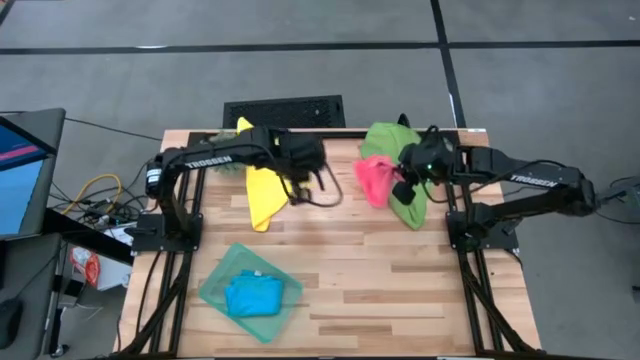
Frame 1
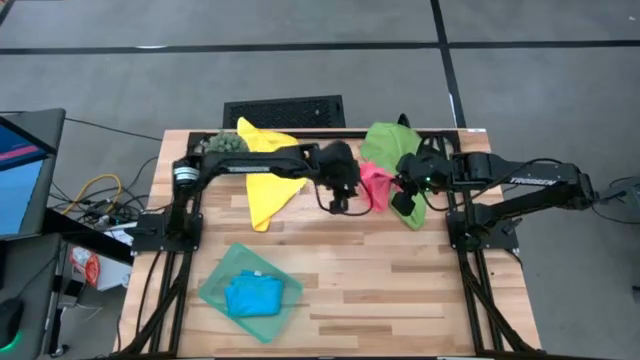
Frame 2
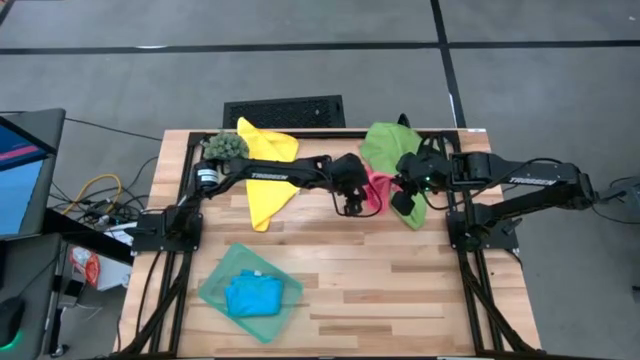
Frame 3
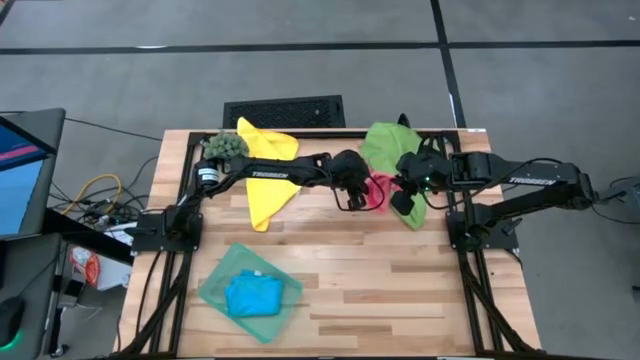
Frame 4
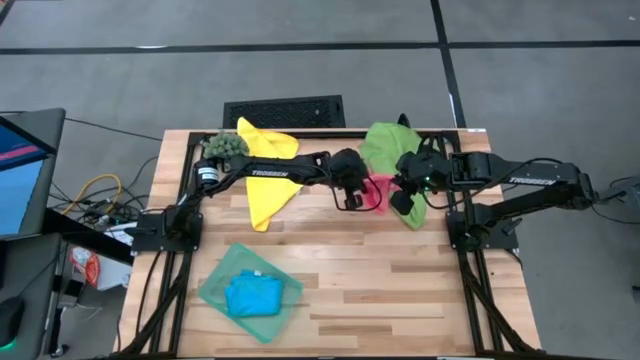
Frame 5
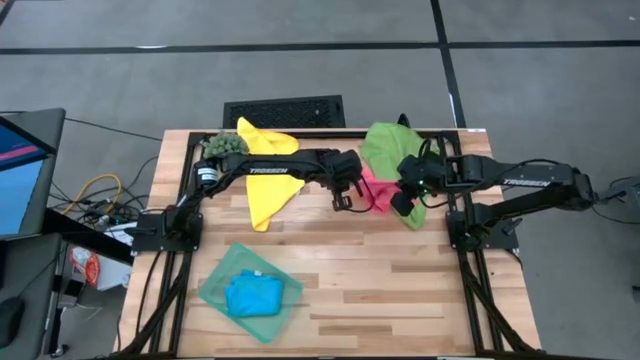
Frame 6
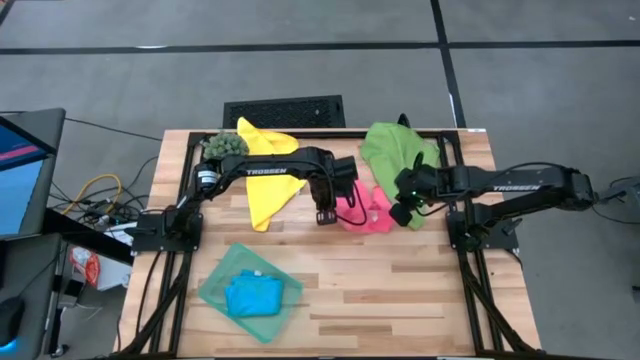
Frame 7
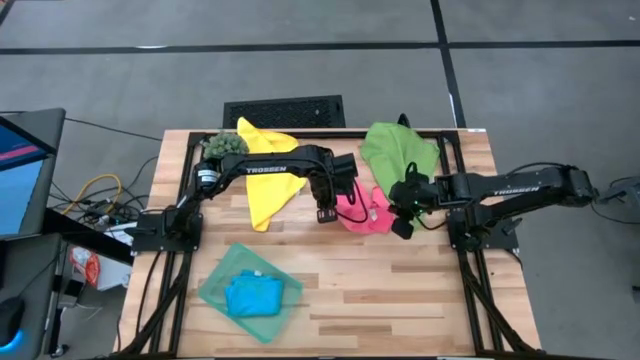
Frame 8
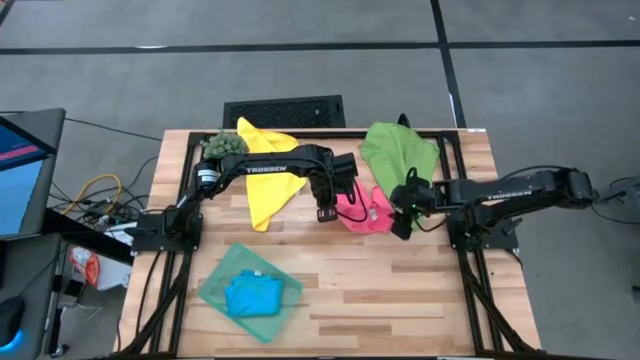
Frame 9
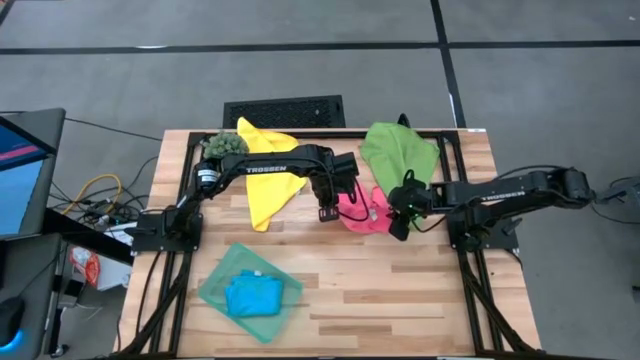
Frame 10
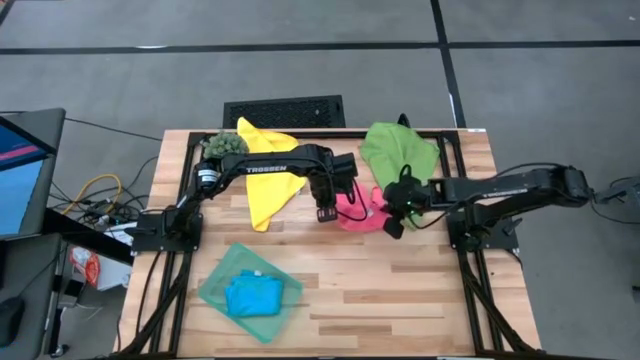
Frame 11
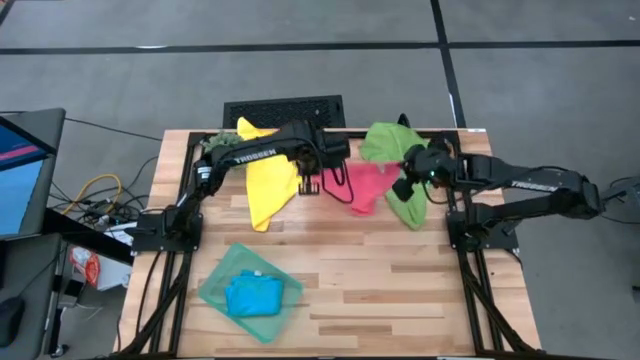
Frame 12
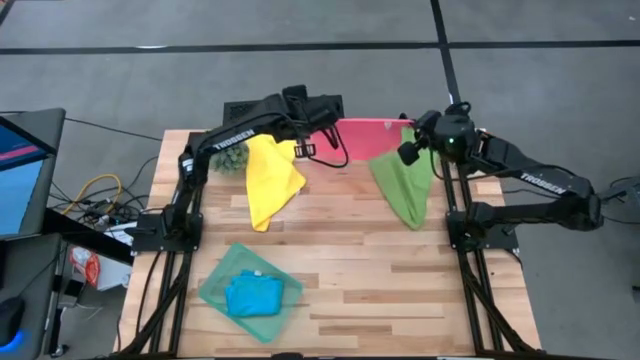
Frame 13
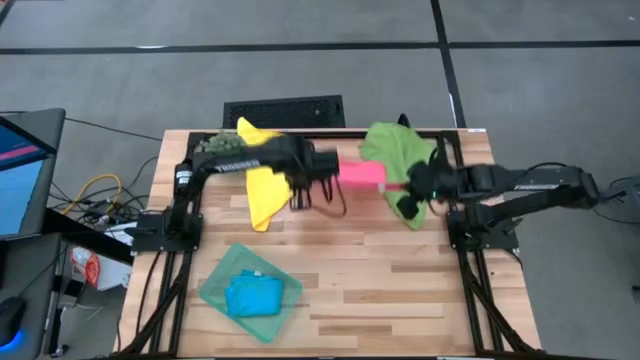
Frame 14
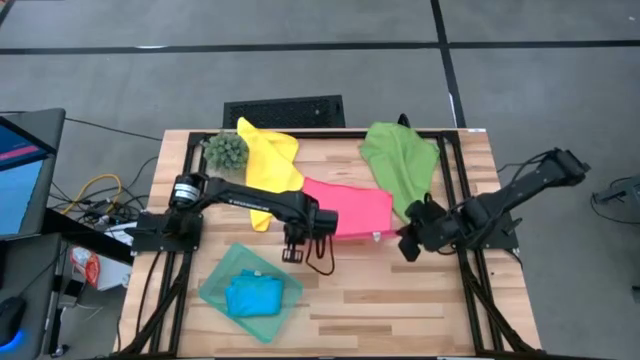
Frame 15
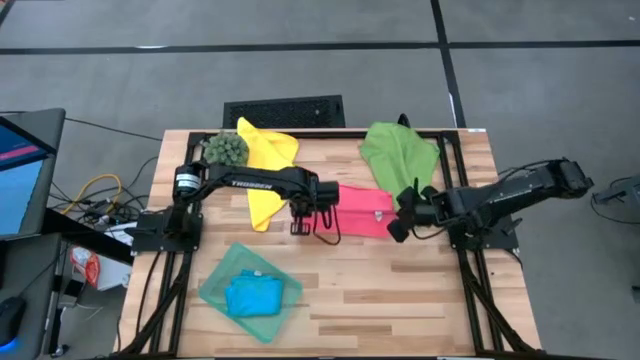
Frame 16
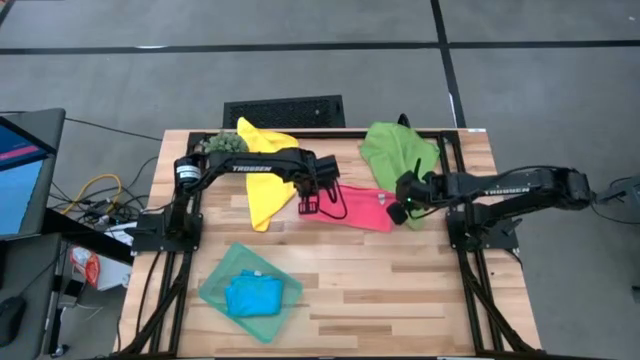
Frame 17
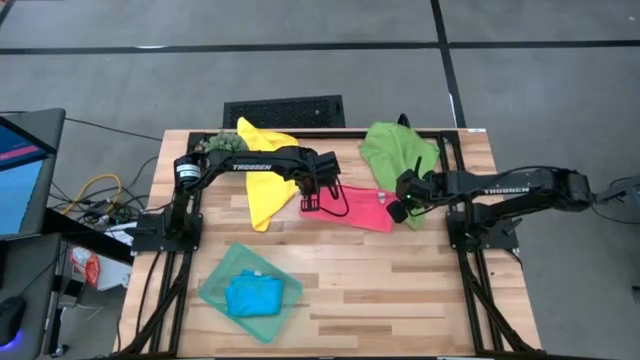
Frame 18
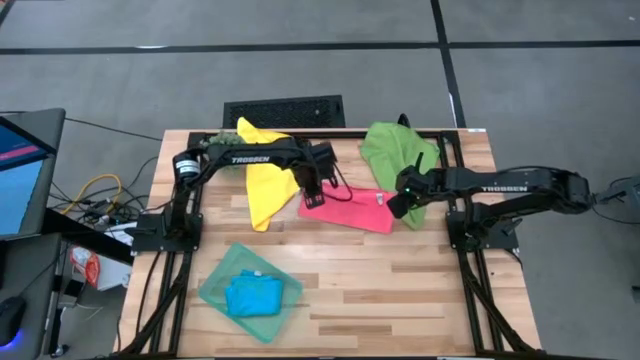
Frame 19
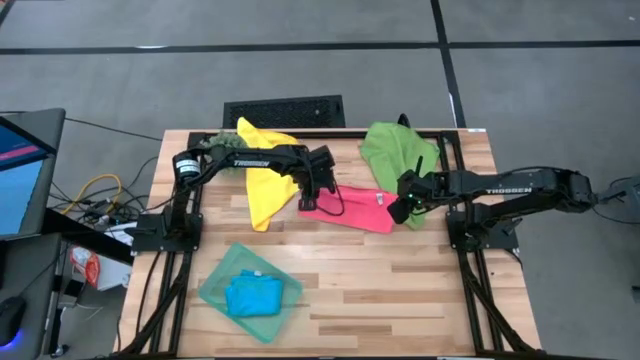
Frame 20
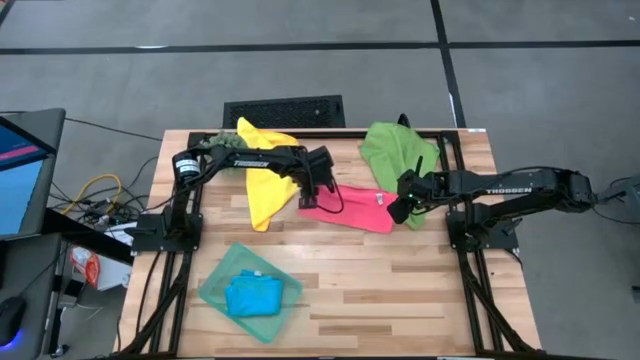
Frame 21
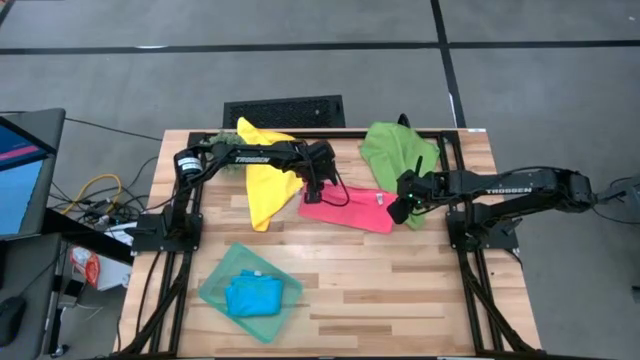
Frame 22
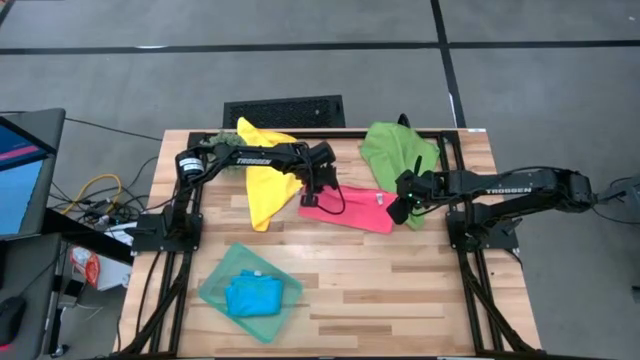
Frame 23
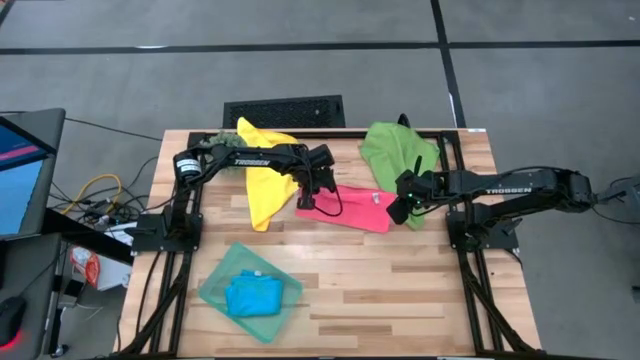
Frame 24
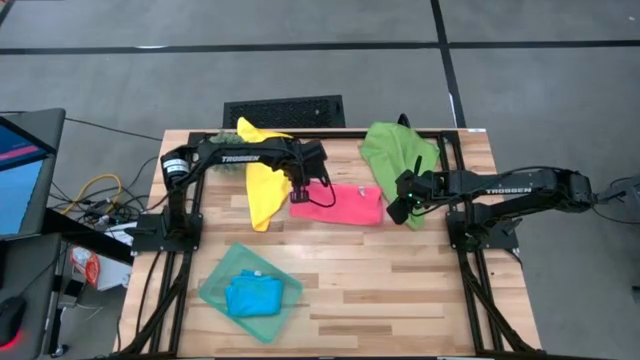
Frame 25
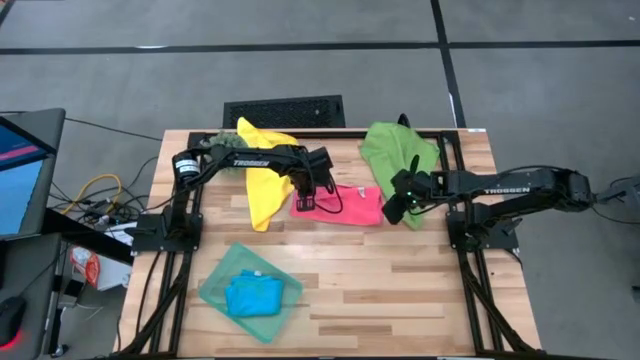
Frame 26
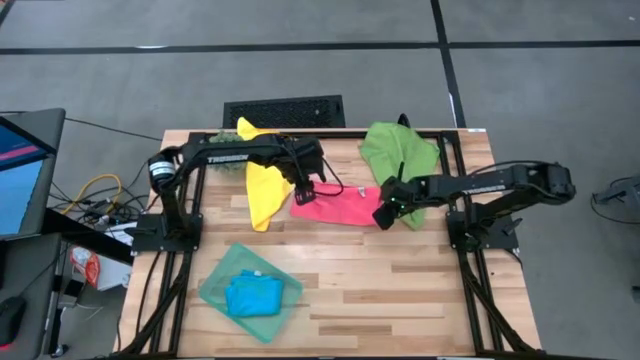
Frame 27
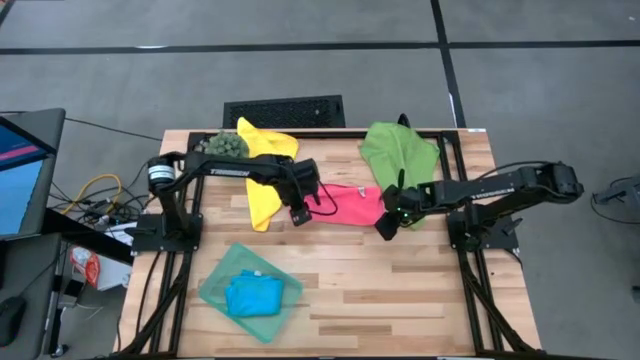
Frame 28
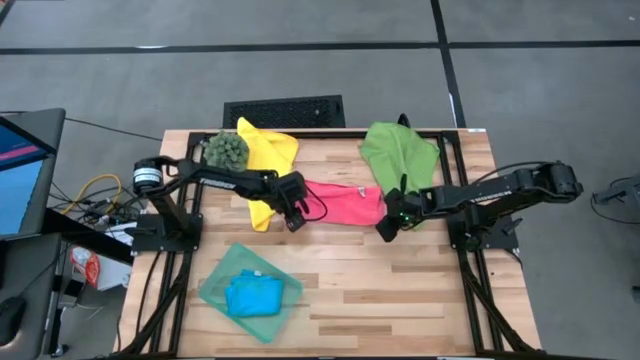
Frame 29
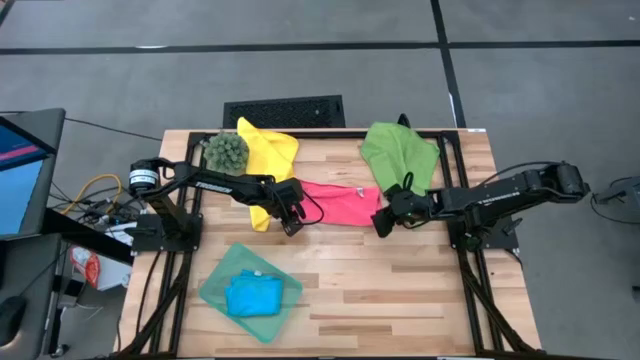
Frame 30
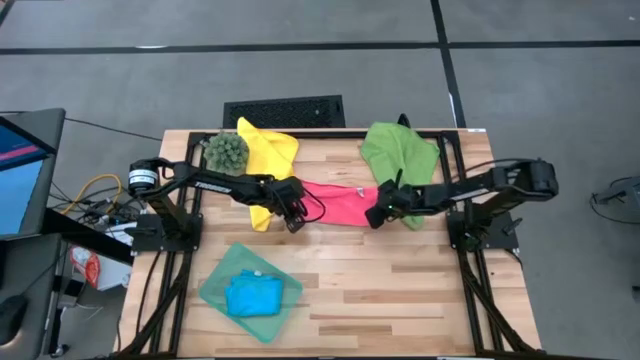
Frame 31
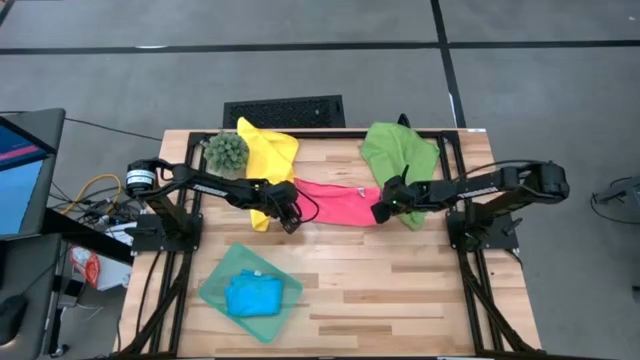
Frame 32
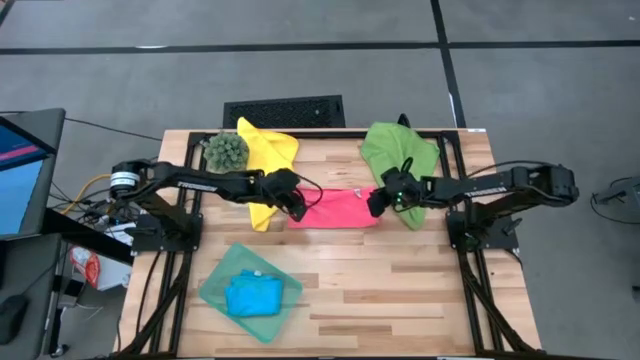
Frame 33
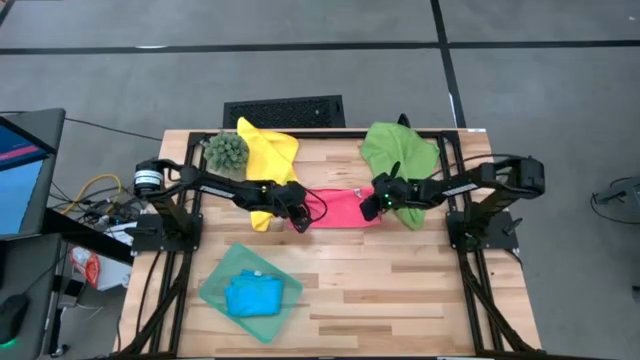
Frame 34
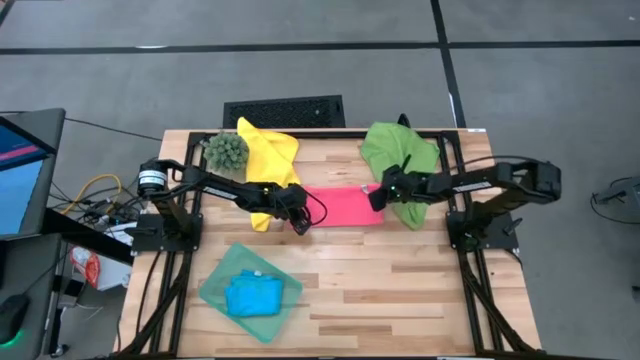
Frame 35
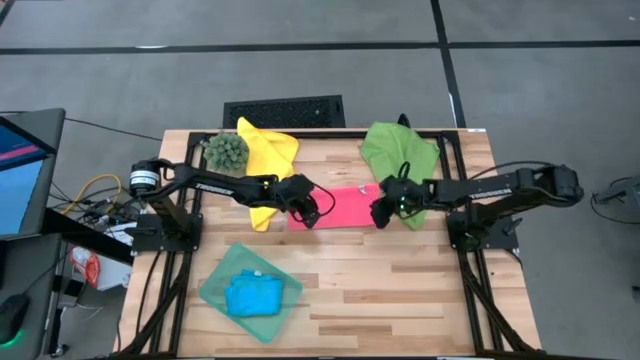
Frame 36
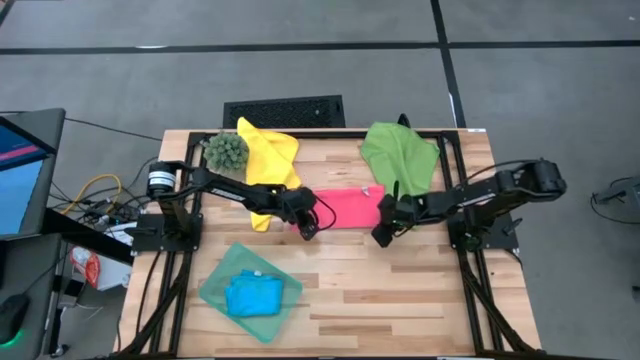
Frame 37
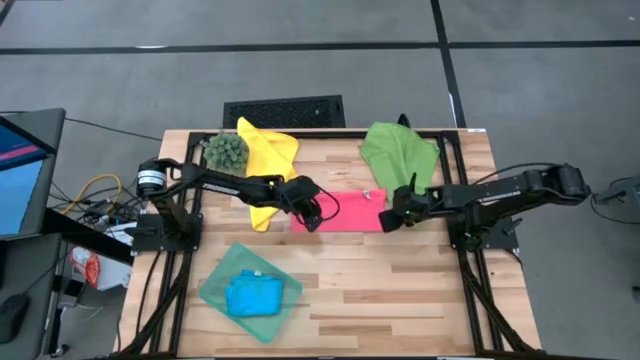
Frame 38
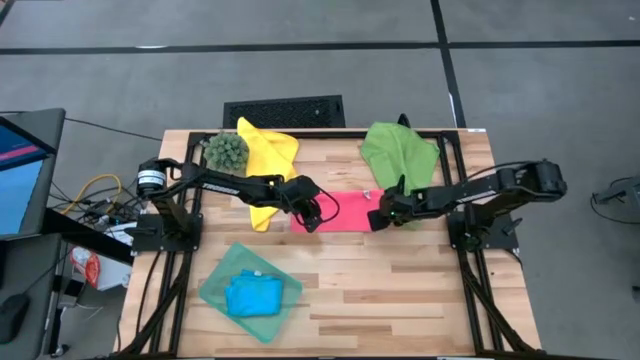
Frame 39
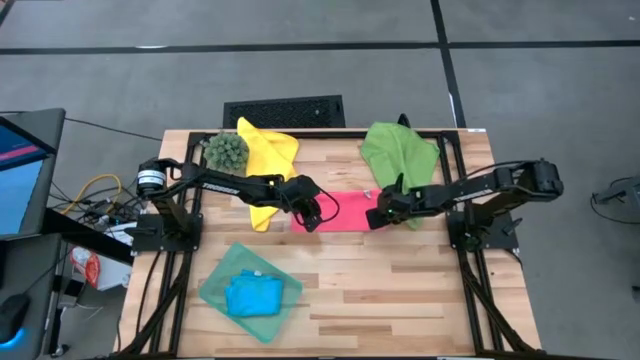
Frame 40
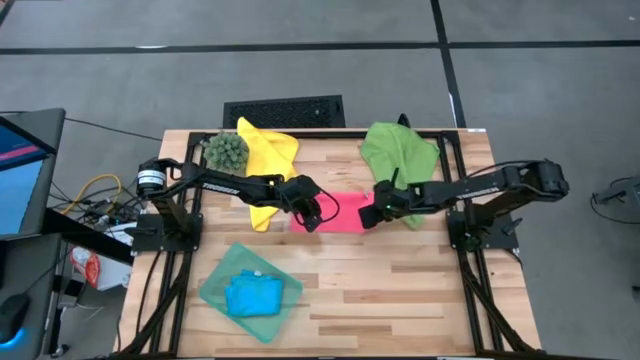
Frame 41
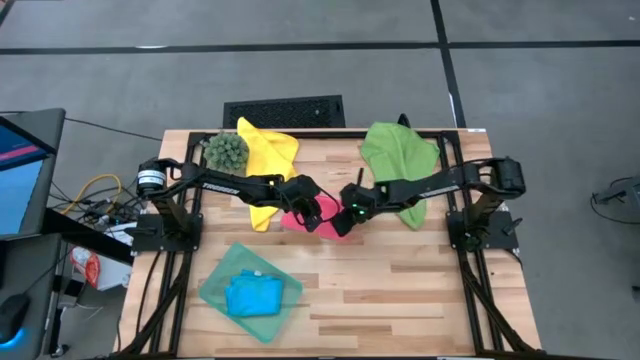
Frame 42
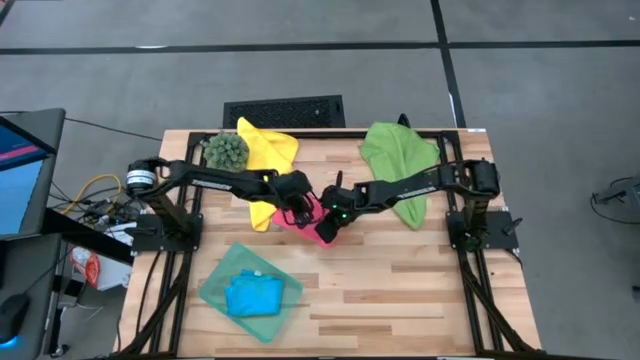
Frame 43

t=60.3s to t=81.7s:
Task: Fold microfiber towels
Fold the pink microfiber towel
